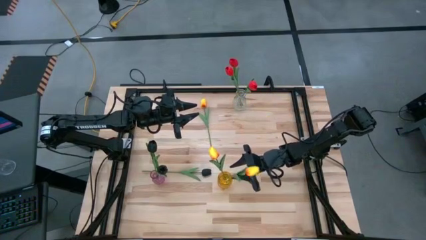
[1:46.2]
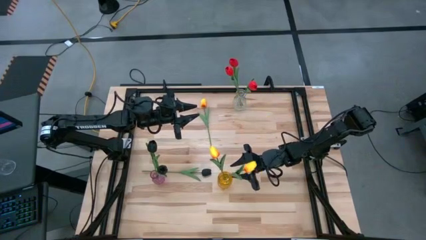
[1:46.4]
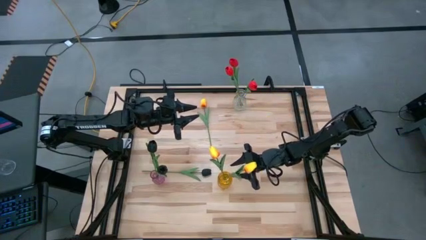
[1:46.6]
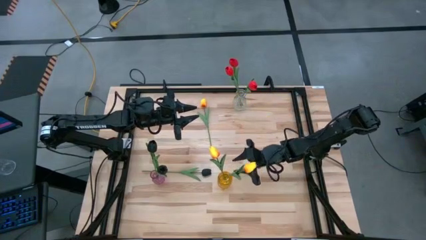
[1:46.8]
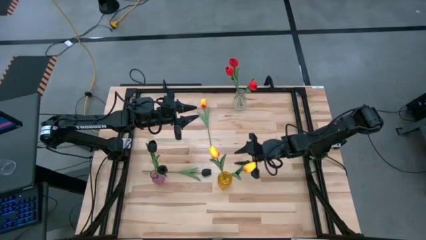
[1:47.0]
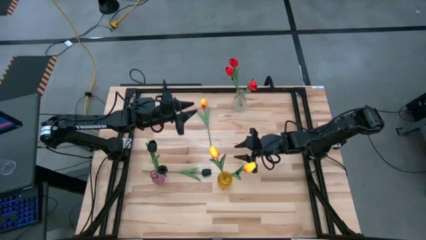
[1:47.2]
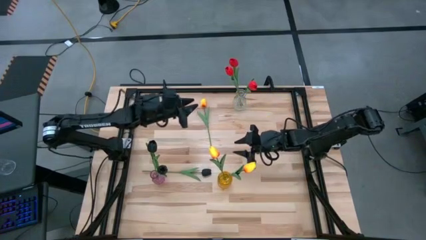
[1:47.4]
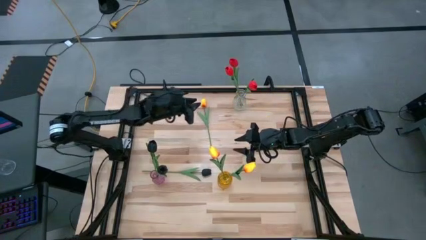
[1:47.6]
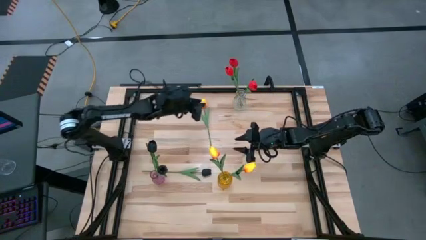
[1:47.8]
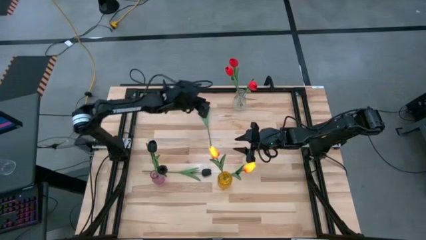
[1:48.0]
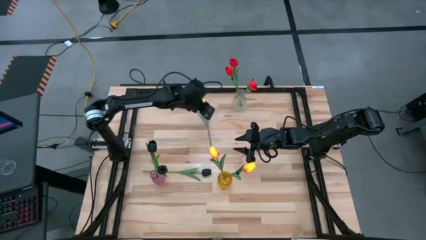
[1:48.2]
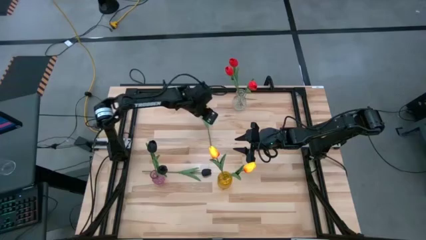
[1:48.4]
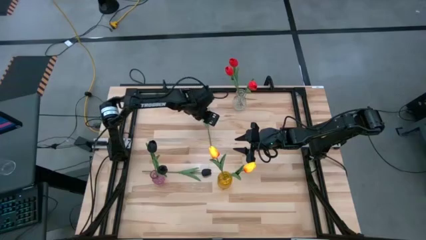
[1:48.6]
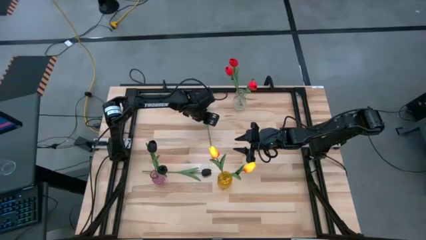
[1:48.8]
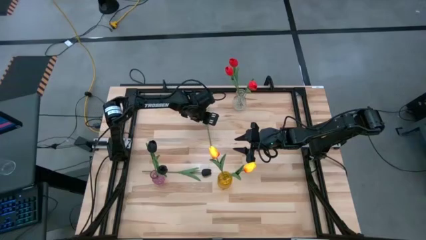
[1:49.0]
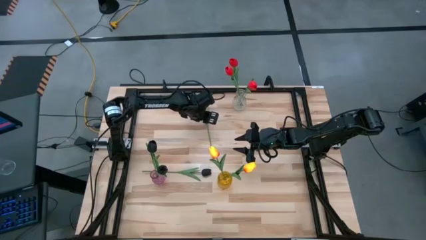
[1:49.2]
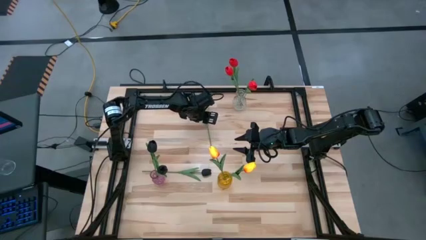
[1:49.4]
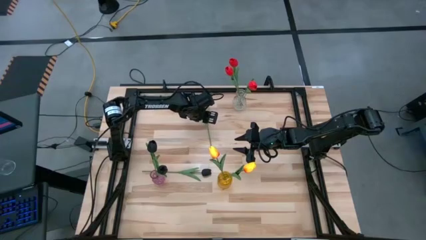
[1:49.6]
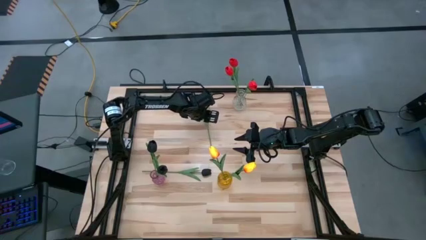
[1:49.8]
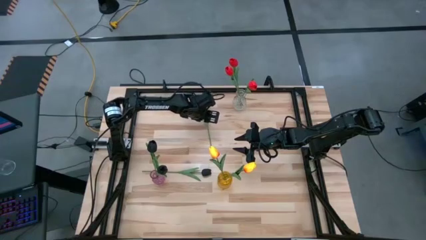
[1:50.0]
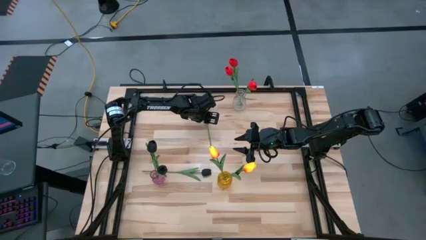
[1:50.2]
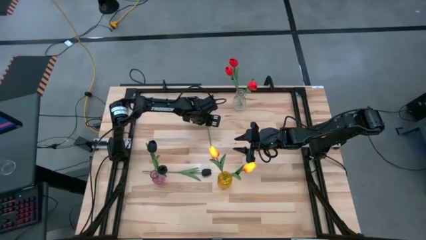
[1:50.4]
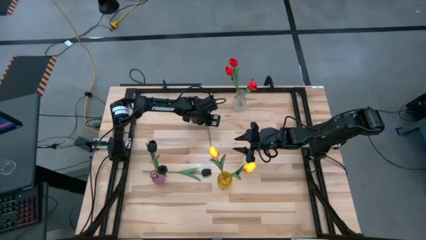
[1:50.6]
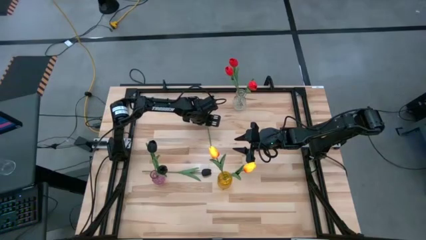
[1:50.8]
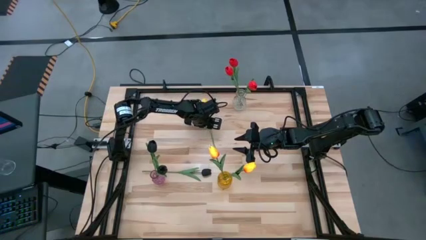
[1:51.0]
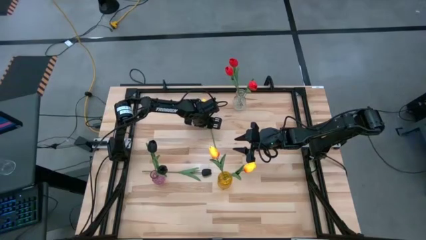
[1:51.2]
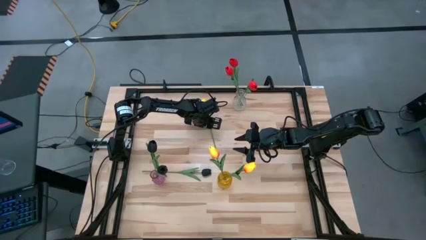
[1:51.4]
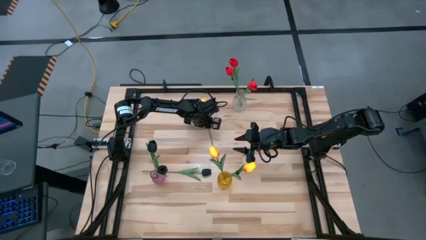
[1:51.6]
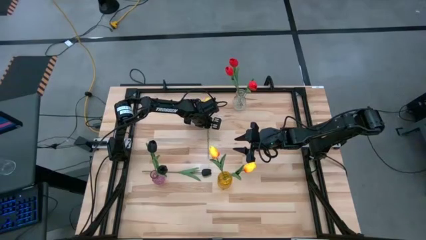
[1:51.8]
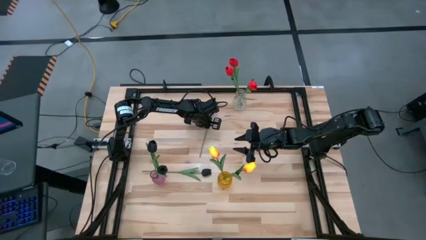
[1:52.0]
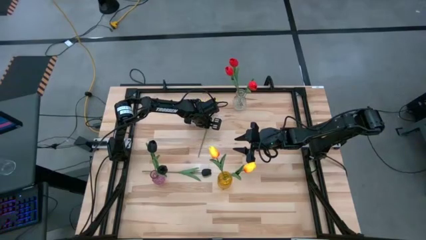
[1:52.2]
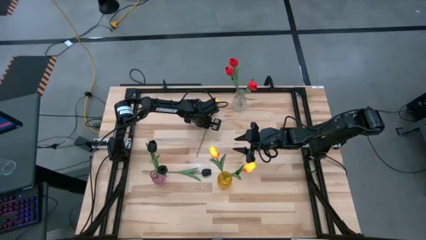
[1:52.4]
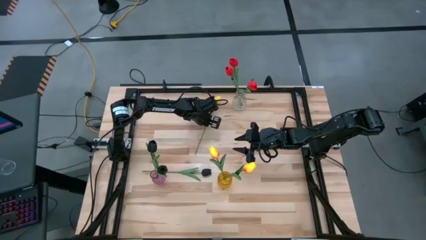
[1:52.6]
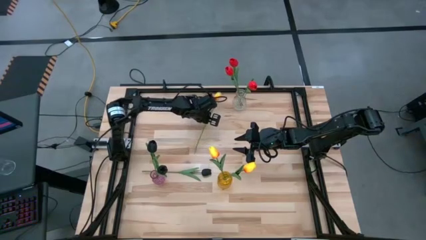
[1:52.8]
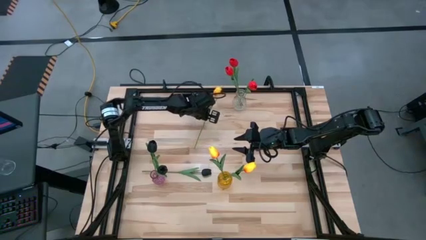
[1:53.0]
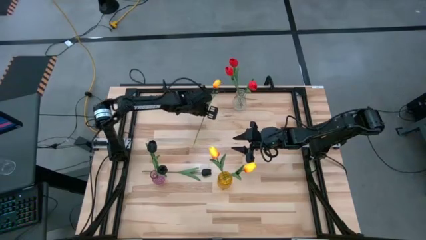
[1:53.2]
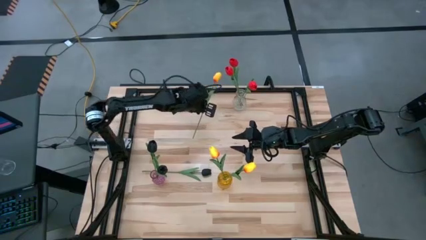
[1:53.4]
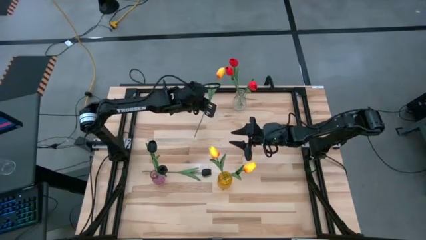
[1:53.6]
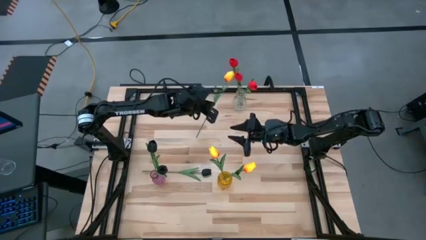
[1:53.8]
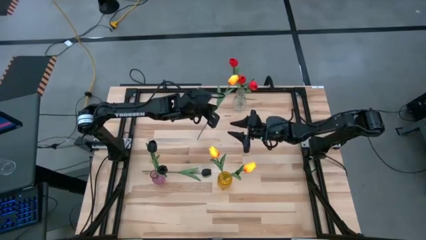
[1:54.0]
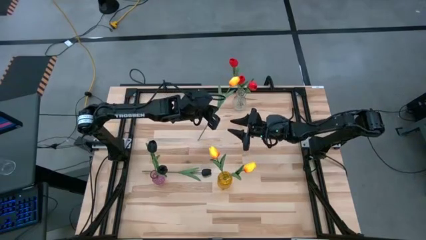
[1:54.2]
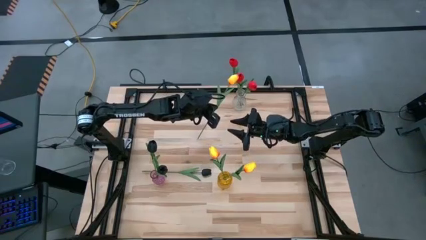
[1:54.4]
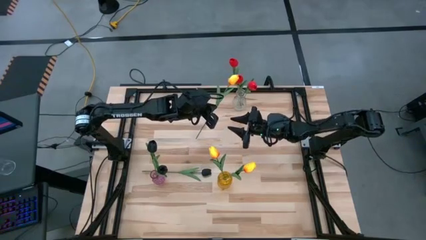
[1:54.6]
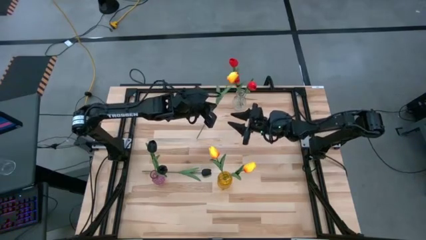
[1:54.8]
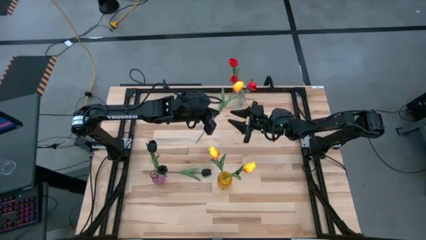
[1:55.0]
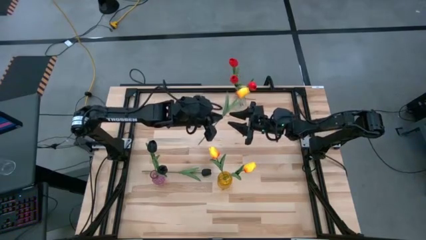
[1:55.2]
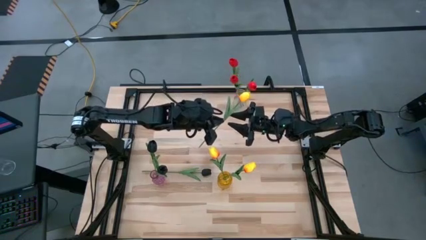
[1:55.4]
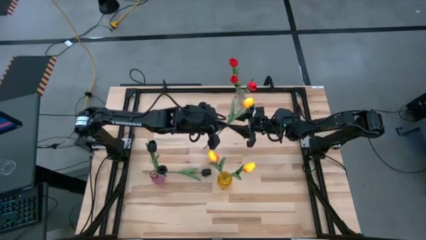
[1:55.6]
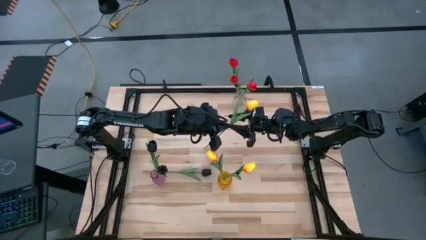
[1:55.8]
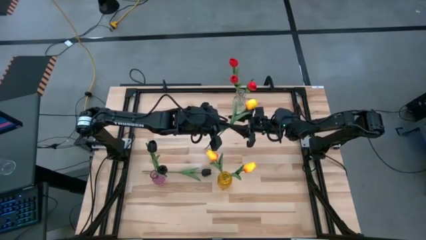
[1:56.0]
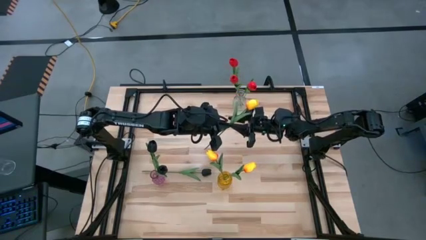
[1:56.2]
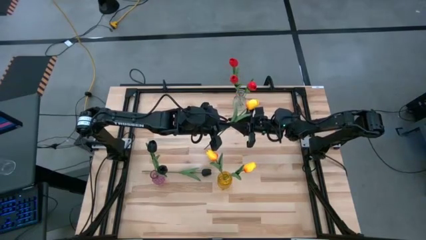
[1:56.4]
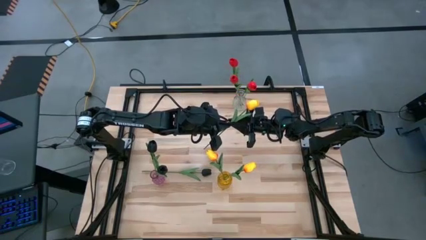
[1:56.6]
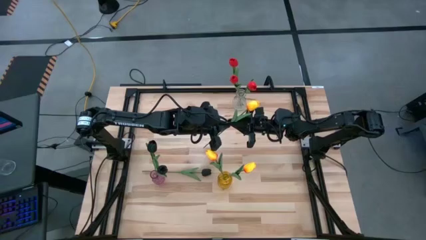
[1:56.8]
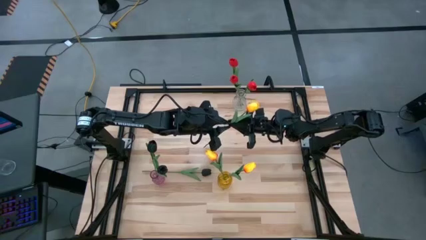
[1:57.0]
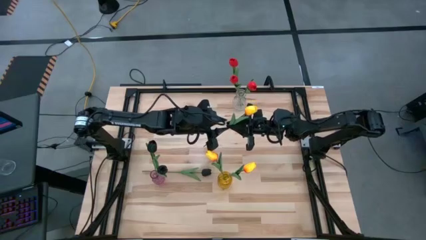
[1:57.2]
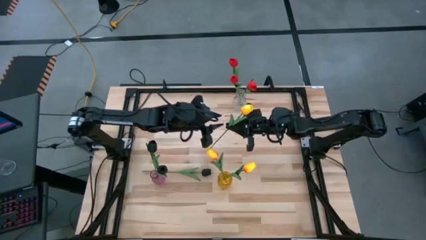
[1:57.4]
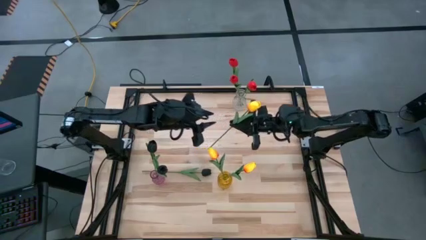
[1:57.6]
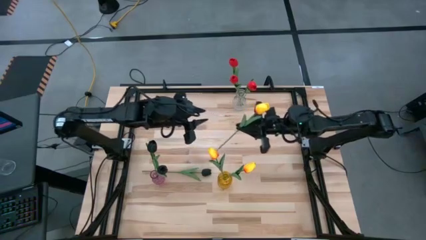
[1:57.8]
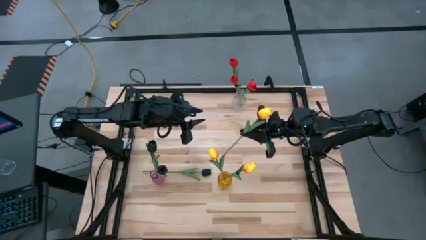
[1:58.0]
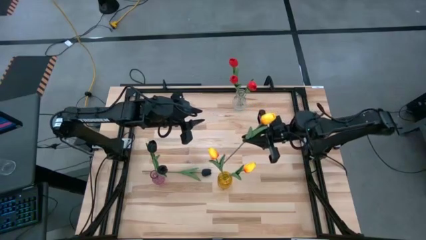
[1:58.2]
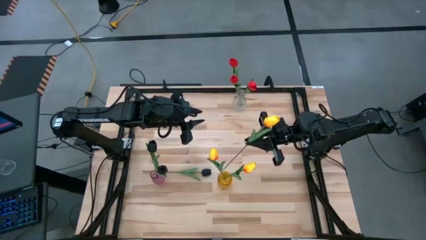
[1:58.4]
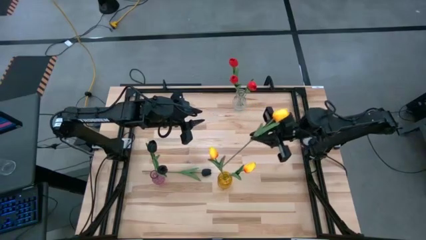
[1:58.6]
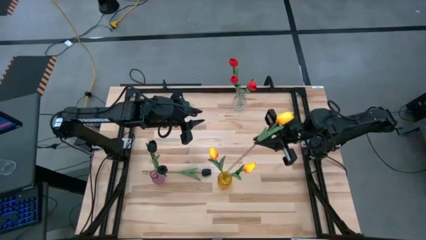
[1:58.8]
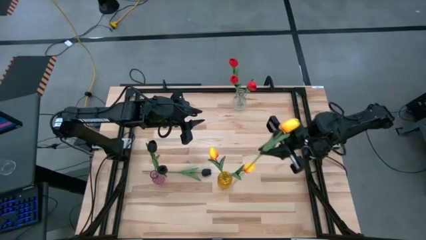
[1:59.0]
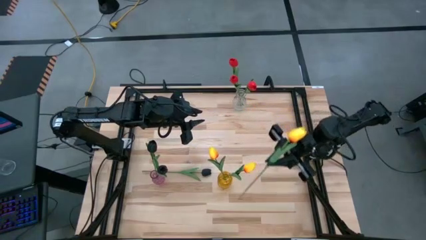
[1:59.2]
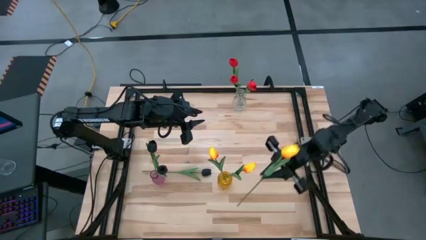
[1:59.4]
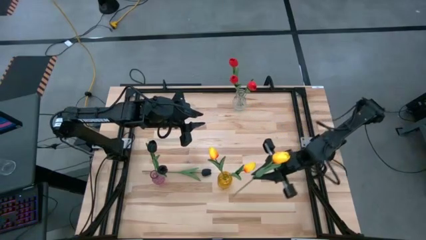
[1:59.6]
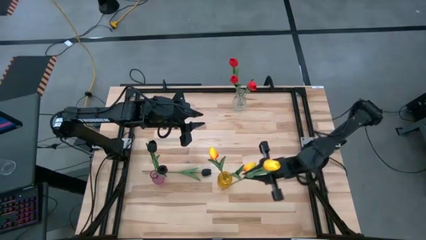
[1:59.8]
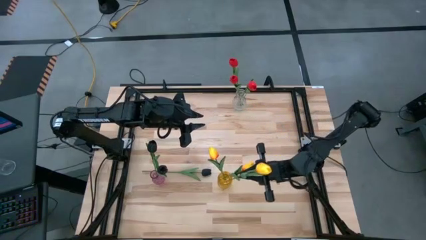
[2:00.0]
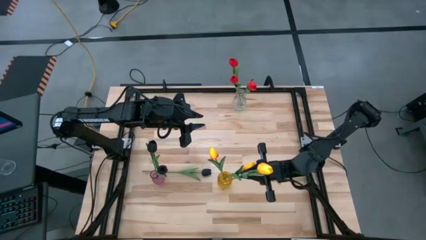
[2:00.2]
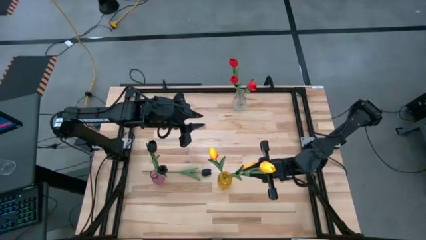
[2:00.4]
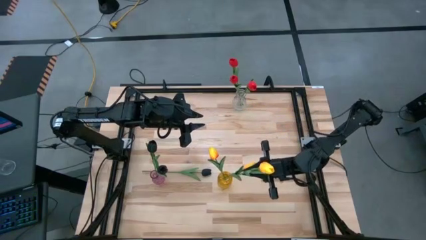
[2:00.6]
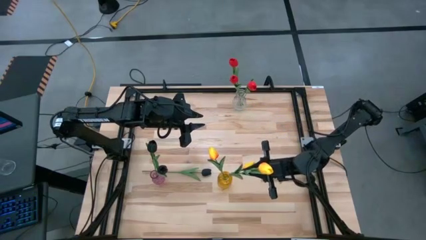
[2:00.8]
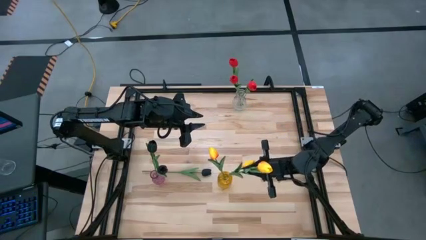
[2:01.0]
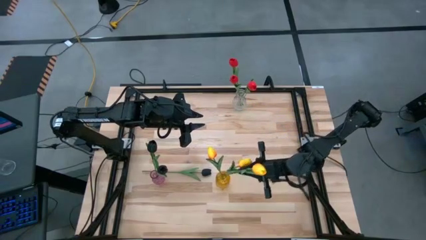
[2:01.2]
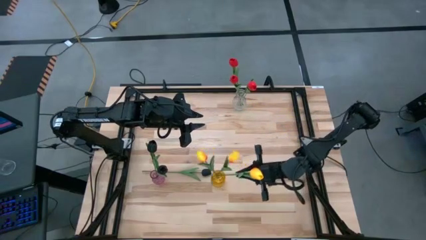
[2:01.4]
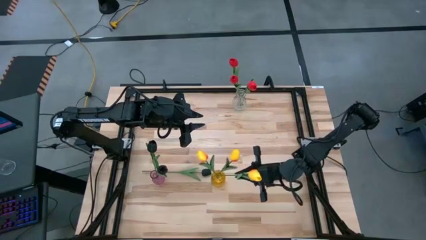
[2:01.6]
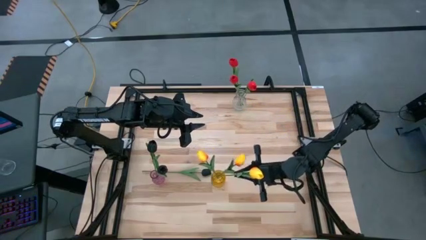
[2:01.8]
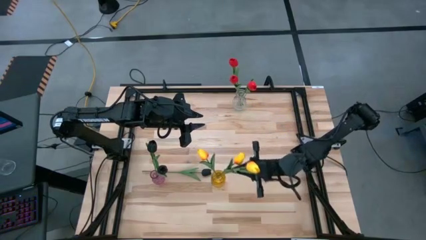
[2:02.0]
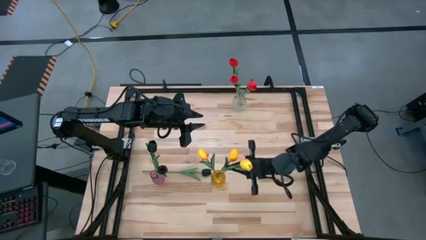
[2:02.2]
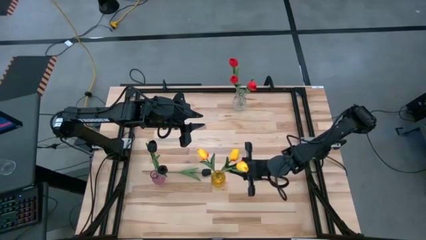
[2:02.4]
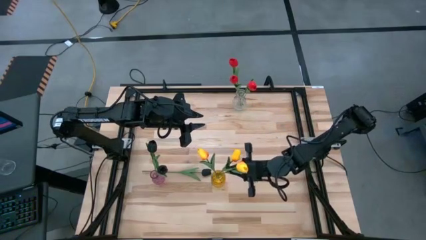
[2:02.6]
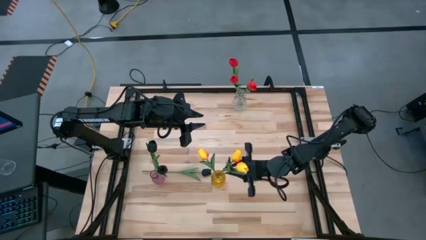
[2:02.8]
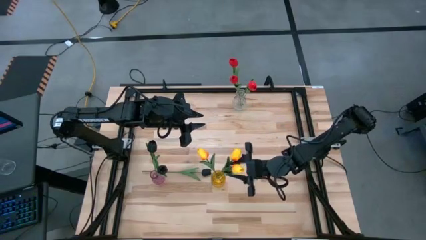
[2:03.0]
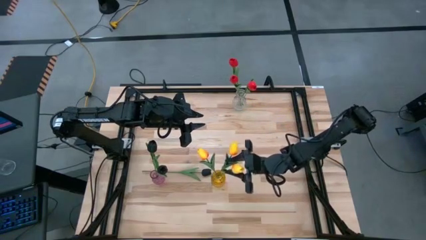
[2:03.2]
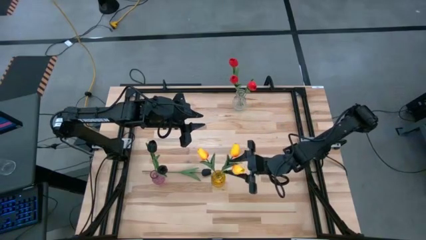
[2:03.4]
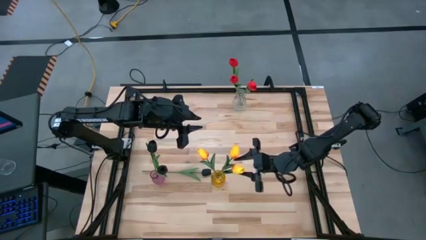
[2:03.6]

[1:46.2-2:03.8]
Task: Sort flowers into vase by color
Put the yellow flower into the yellow vase

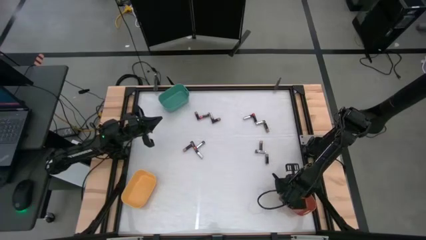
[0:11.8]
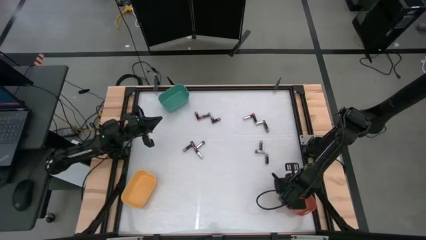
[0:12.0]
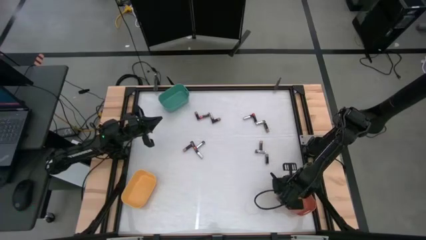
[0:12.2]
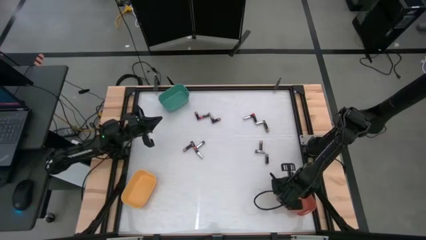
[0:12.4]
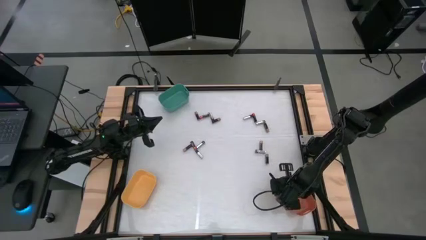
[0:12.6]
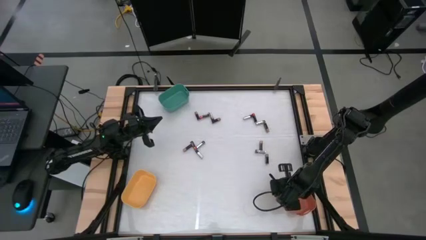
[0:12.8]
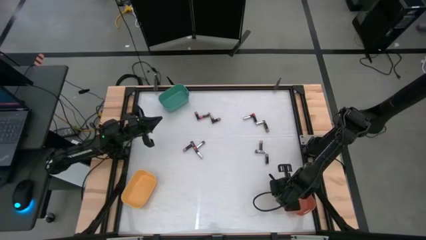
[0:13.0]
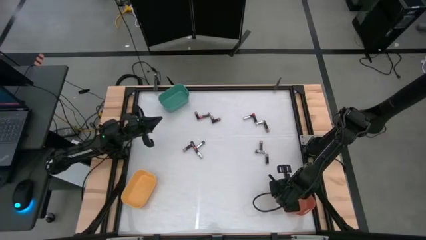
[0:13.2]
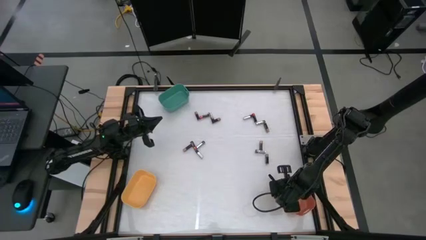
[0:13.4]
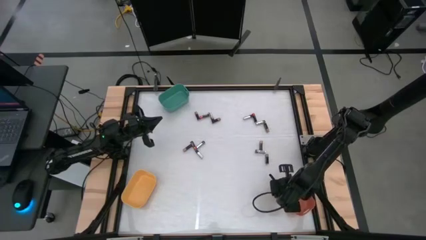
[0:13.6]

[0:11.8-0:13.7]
Task: Sort batteries
Adjust the orange bin
